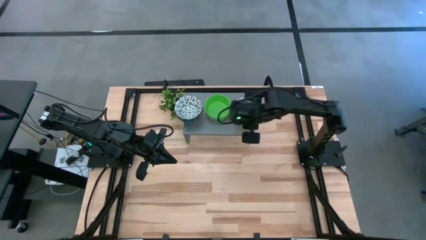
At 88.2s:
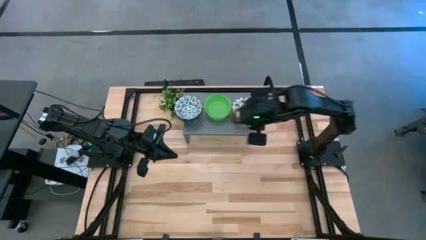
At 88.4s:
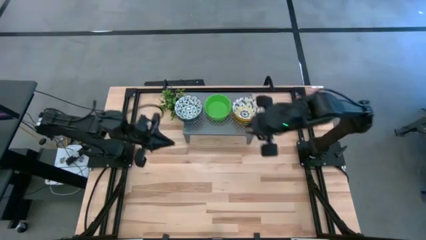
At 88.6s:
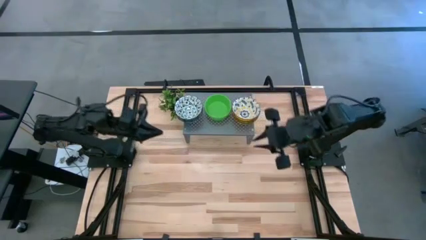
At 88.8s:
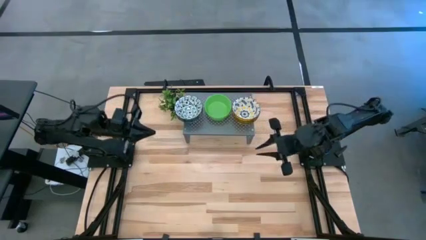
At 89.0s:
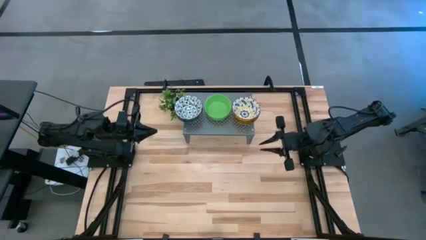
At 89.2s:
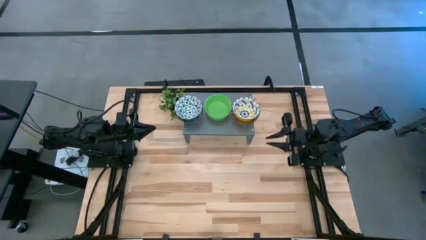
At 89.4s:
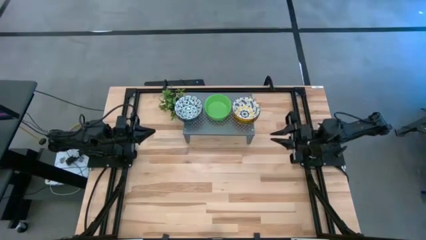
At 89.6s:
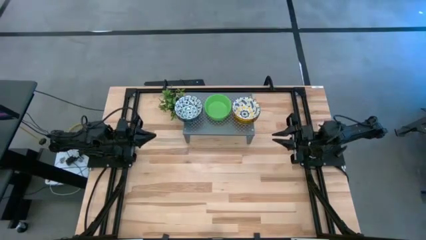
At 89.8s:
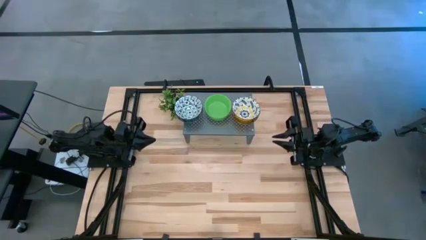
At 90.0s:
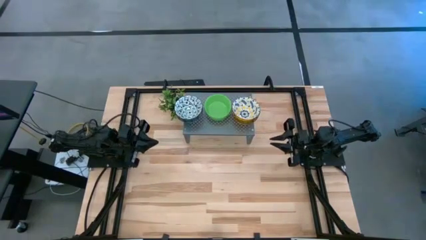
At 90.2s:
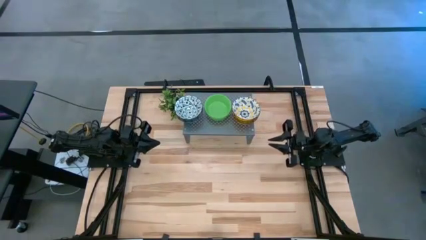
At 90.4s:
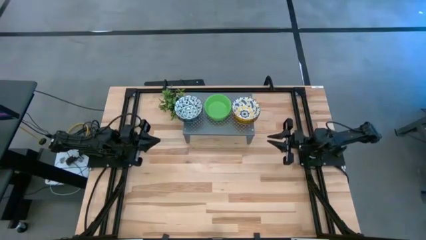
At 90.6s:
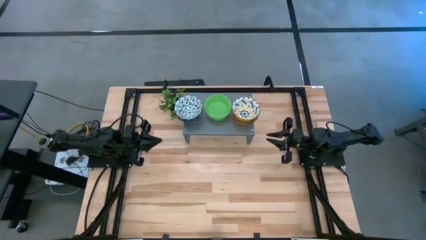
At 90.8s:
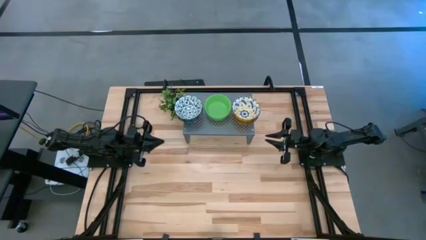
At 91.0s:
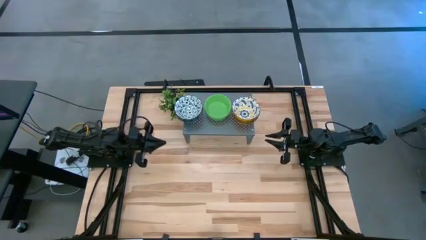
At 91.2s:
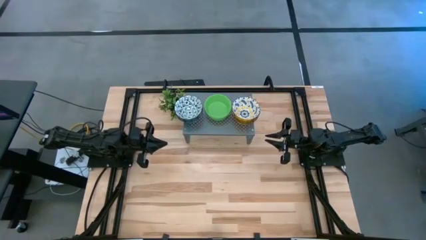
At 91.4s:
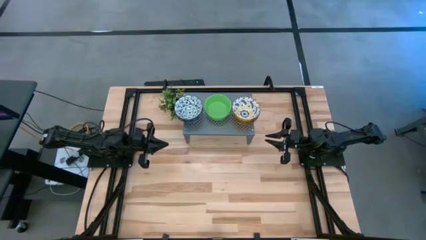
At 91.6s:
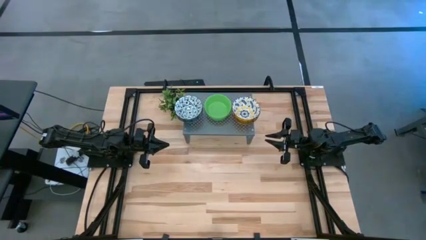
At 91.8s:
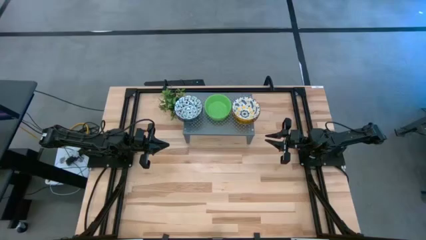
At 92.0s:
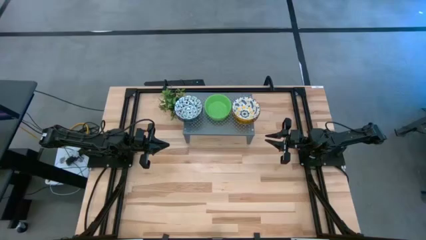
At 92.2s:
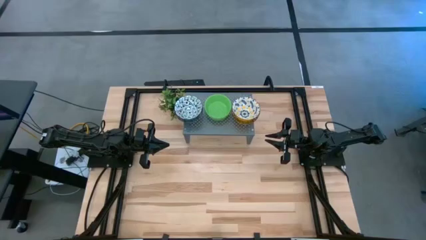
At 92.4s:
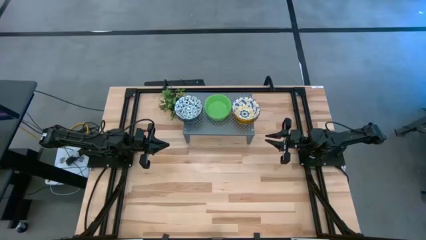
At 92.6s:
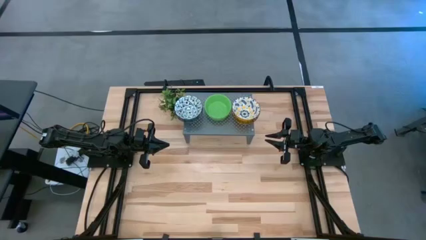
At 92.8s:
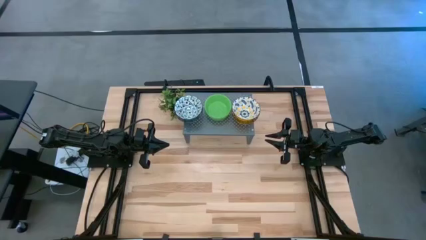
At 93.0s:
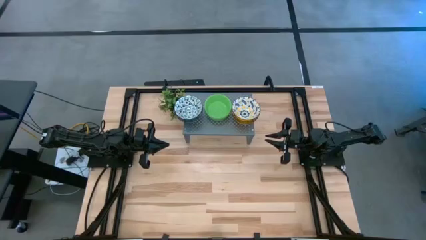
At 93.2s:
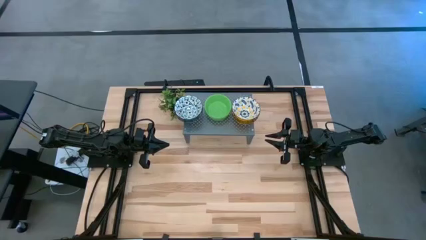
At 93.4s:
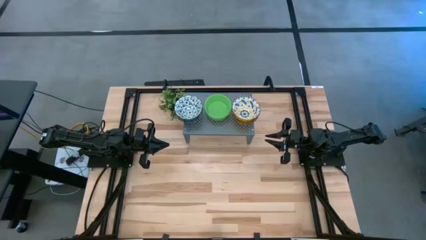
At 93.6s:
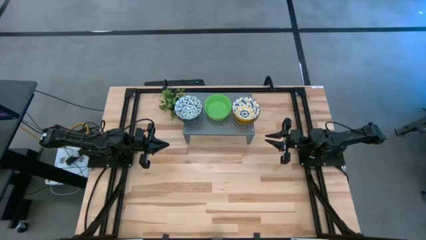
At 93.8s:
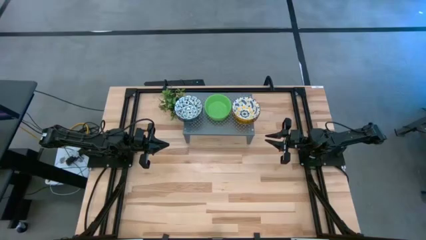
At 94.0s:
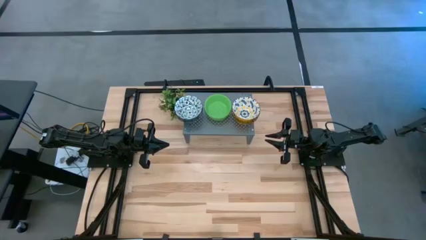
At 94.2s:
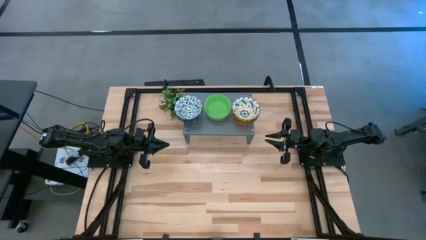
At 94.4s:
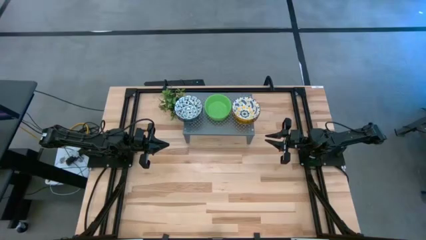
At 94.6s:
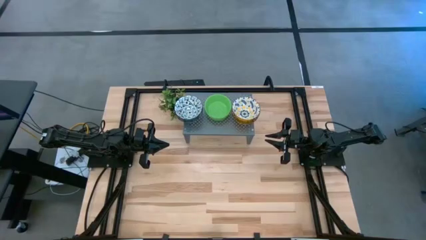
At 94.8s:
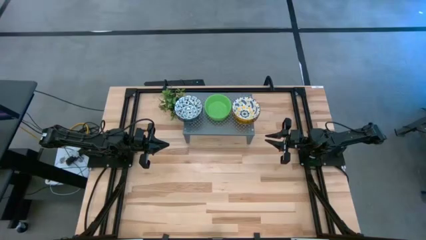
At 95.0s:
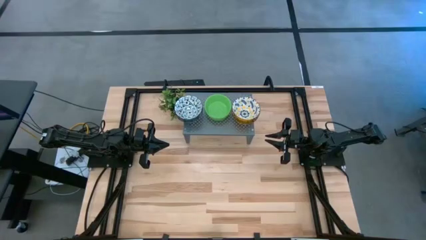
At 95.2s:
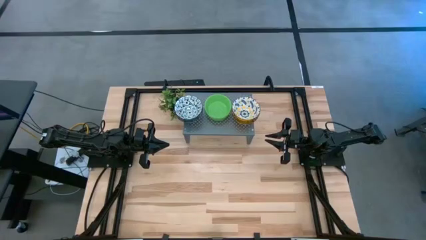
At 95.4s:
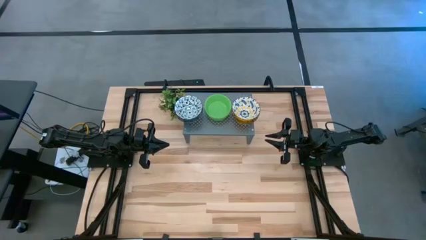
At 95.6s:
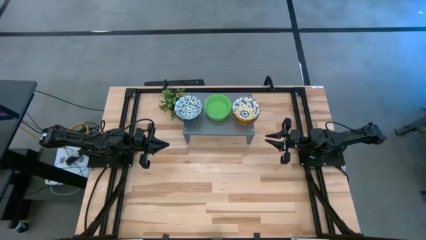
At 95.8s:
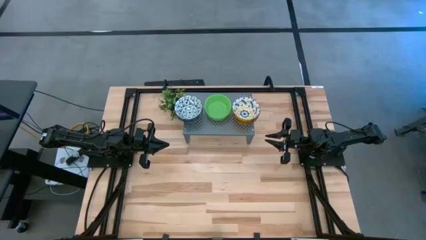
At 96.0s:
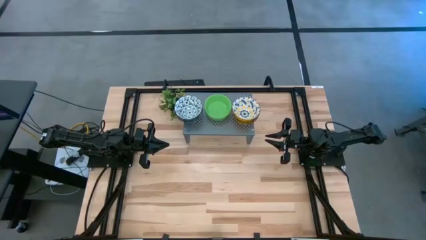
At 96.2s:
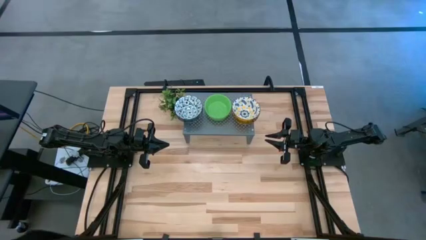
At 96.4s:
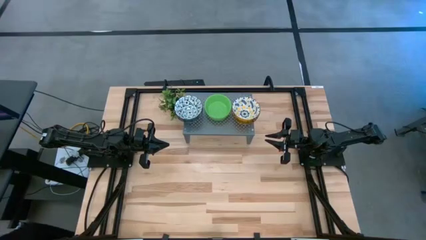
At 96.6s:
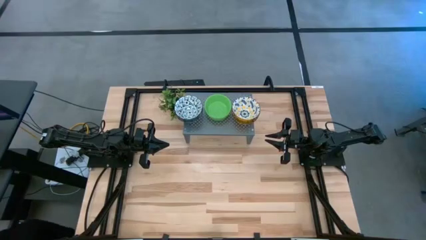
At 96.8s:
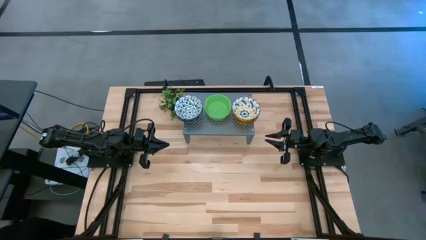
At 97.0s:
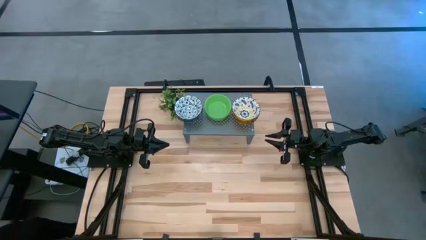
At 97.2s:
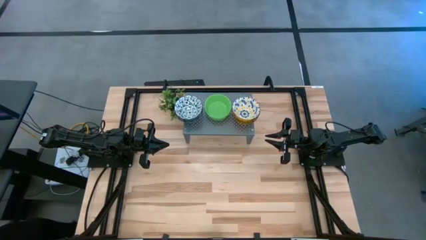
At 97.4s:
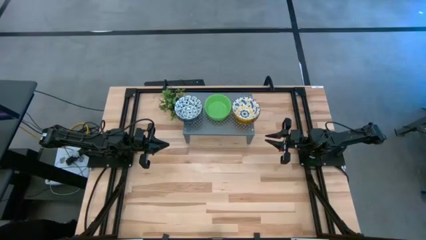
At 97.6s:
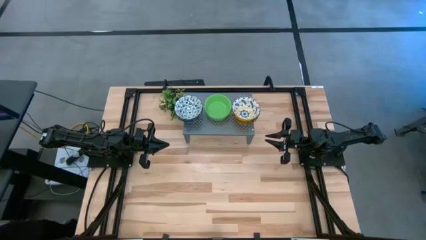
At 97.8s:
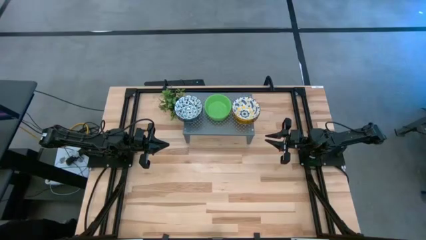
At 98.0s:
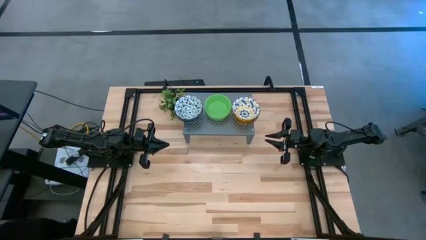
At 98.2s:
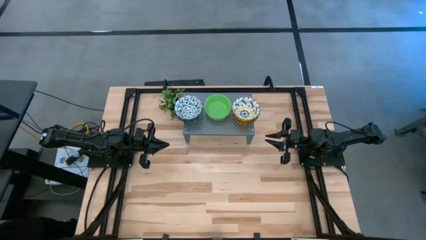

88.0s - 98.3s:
Task: Pick & Place Mini bowls
Return to Home Position

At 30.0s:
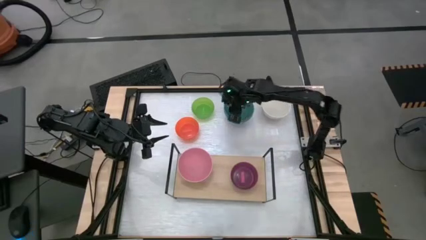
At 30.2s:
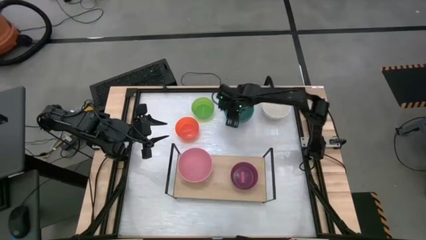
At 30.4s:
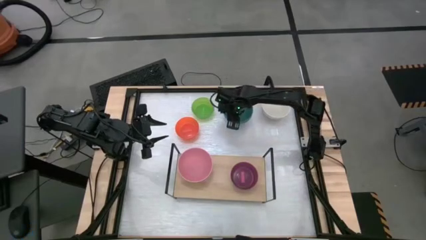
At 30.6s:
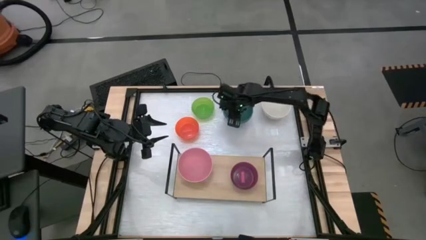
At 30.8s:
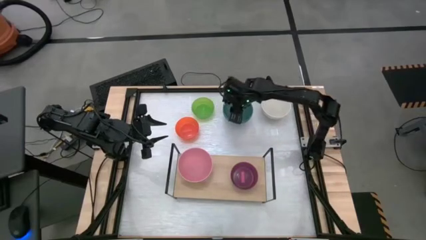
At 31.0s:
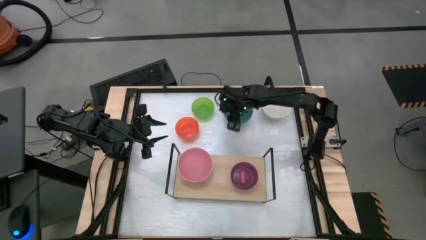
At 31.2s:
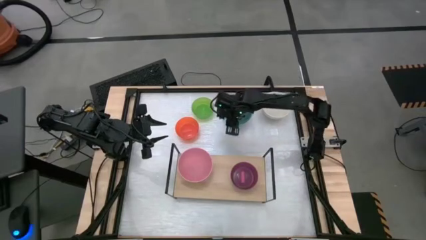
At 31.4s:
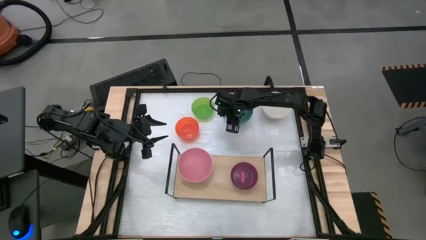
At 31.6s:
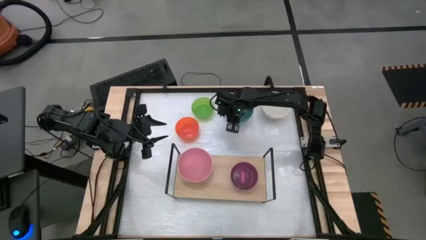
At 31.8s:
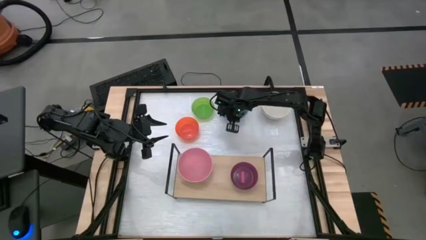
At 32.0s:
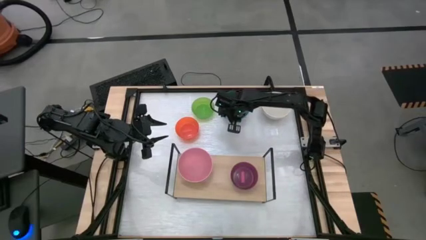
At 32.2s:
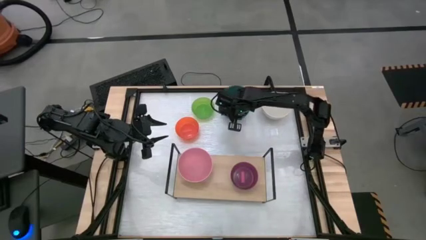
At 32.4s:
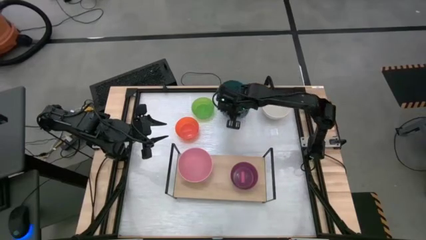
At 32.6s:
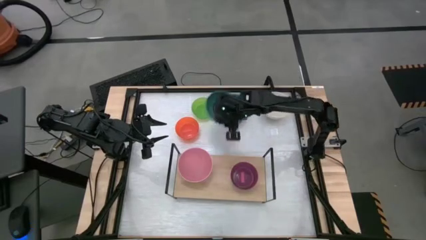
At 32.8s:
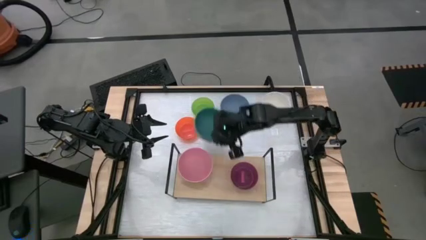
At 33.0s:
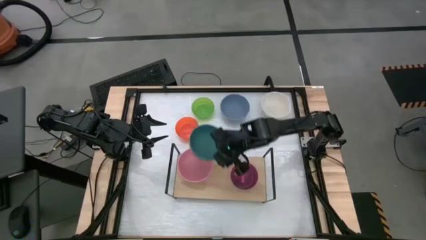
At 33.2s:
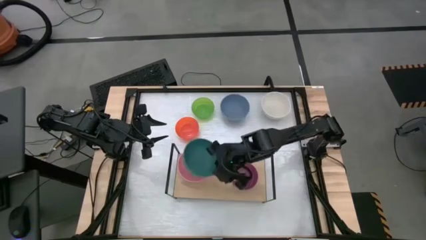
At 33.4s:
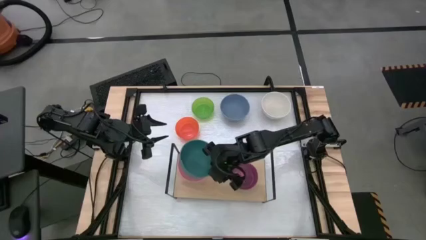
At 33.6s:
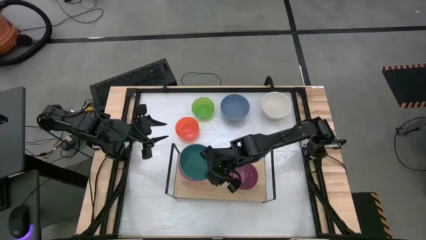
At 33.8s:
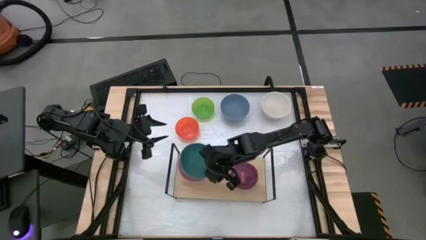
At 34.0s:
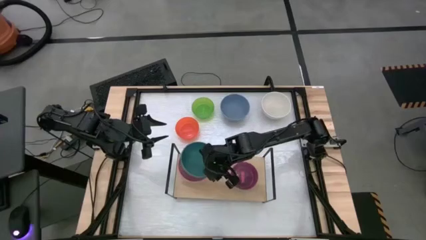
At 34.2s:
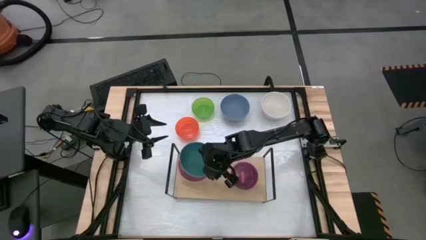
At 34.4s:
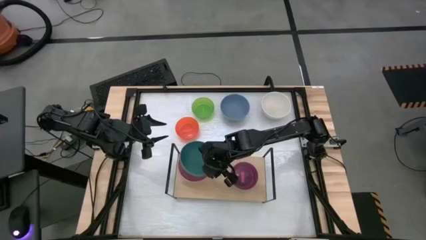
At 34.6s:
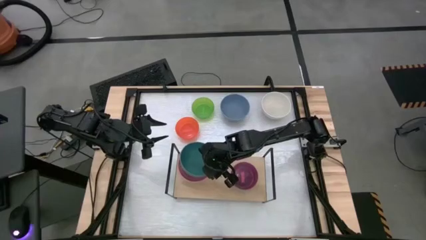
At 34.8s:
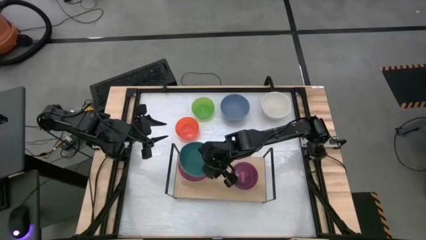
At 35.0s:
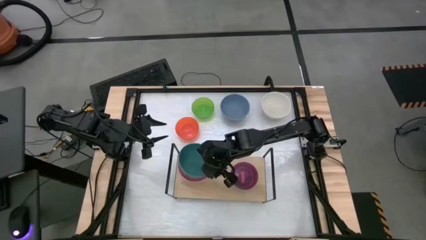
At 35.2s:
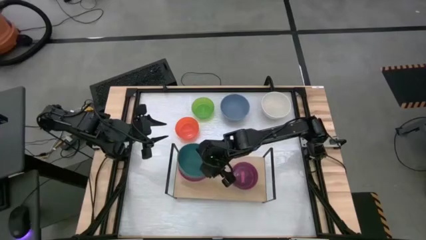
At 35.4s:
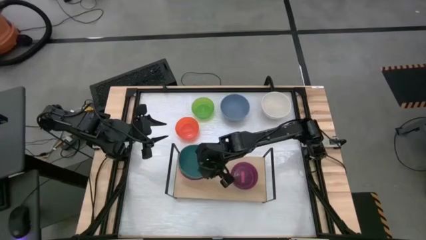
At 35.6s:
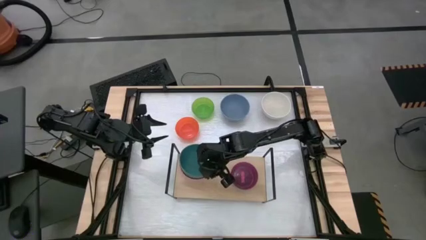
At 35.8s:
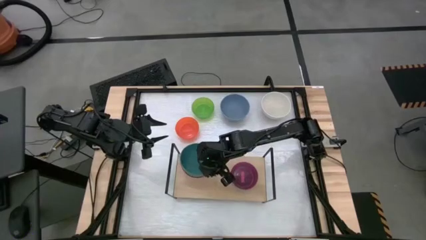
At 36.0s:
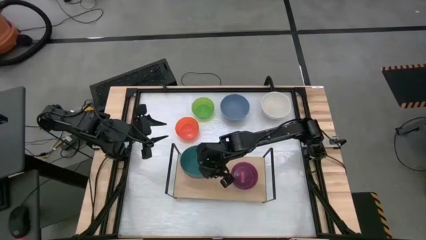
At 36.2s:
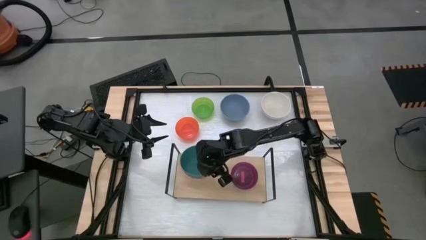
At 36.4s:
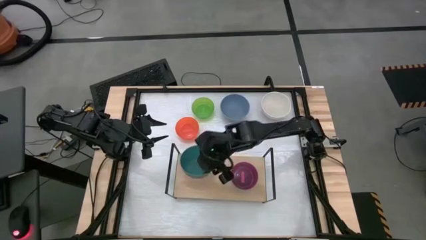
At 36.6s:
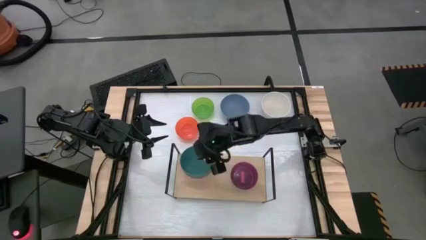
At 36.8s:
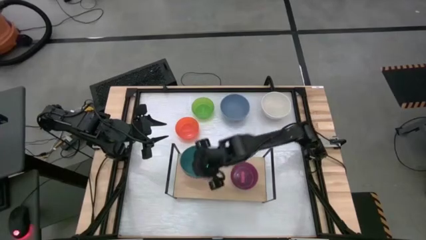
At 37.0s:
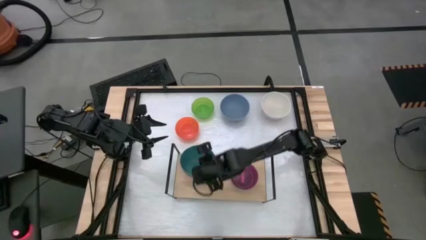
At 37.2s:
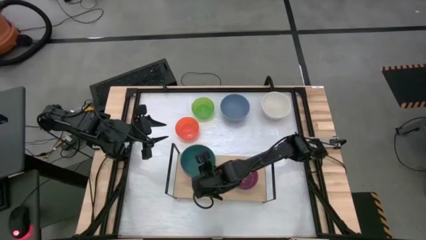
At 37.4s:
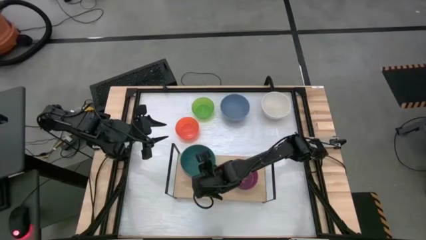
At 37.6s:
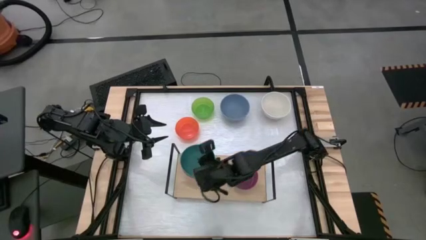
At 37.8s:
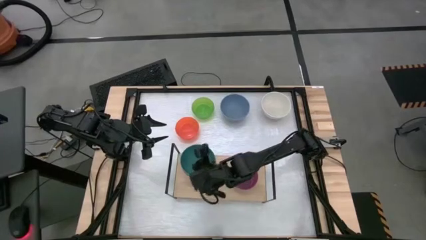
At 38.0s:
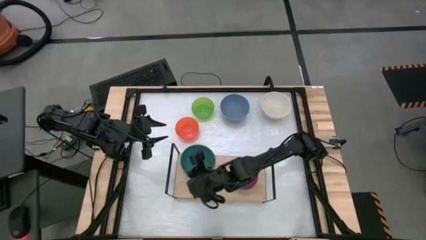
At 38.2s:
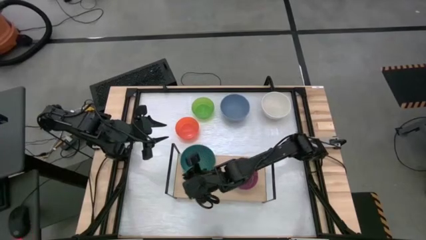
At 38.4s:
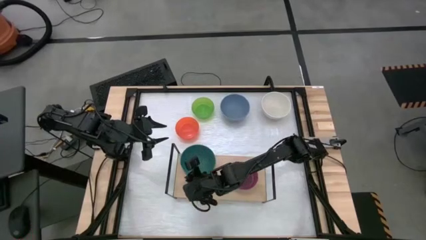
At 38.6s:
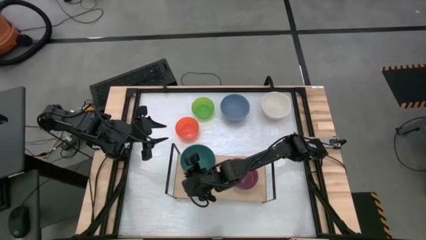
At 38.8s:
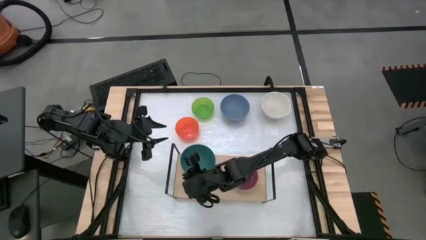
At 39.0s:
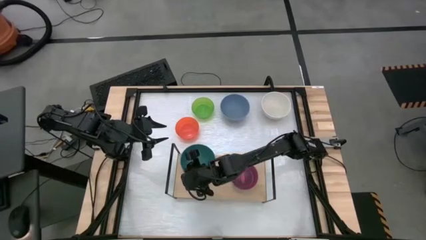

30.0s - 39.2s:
Task: Place and stack bowls onto a shelf
Stack the big dark green bowl on top of the big pink bowl on the shelf
